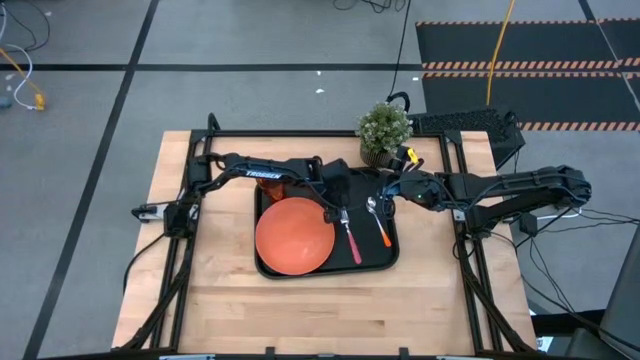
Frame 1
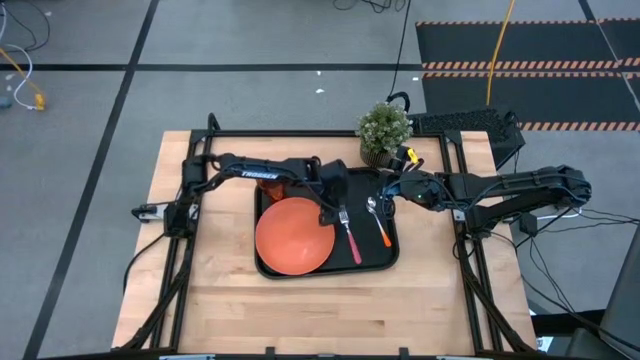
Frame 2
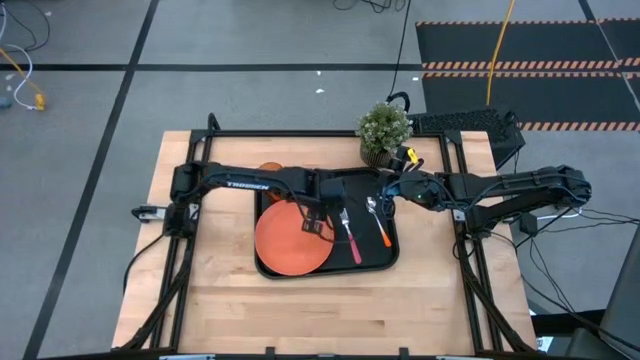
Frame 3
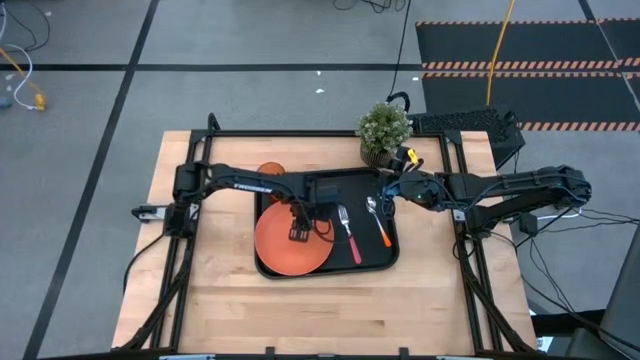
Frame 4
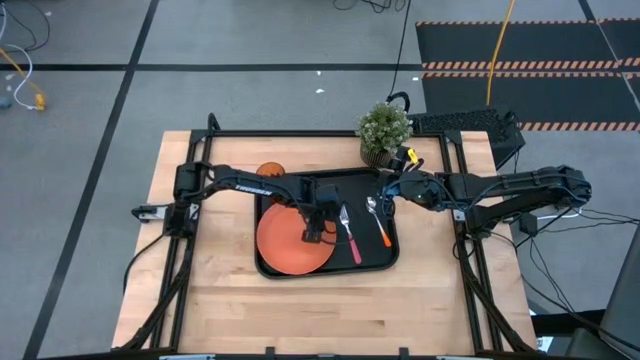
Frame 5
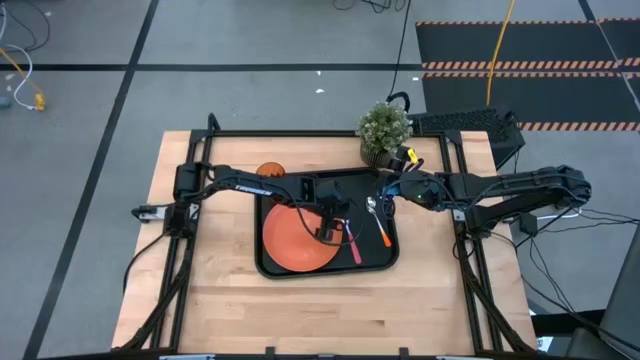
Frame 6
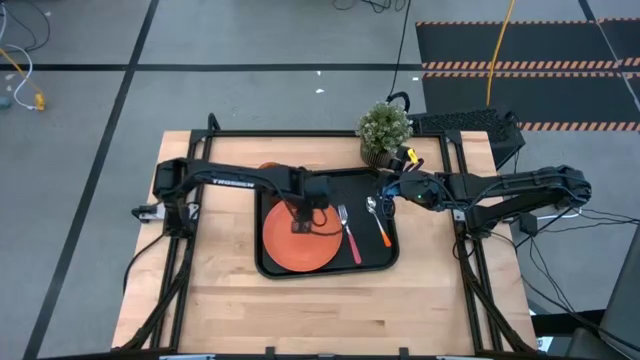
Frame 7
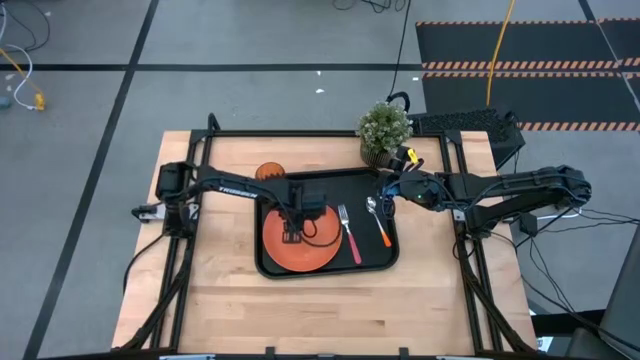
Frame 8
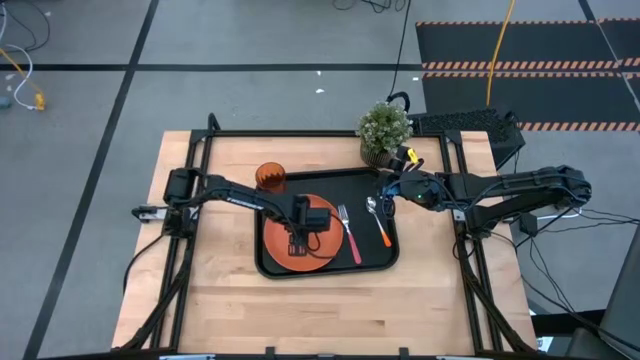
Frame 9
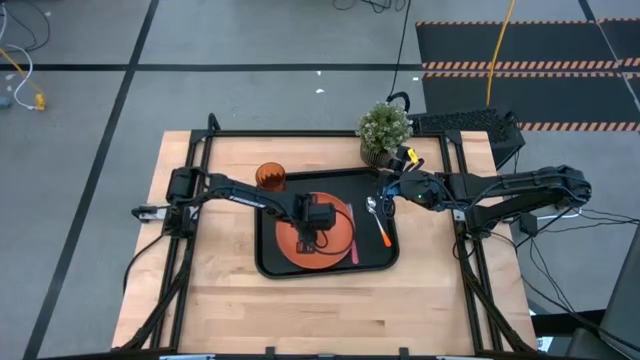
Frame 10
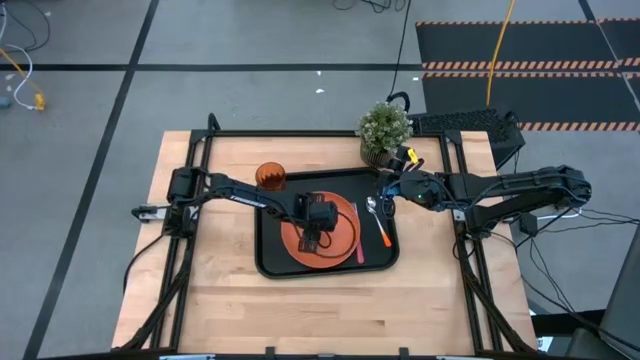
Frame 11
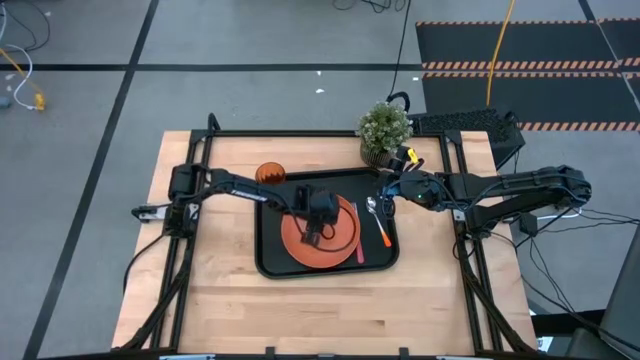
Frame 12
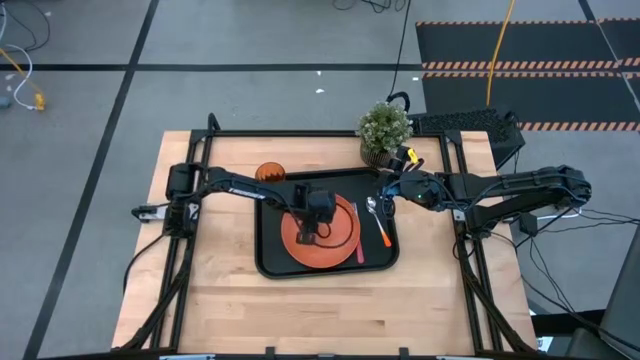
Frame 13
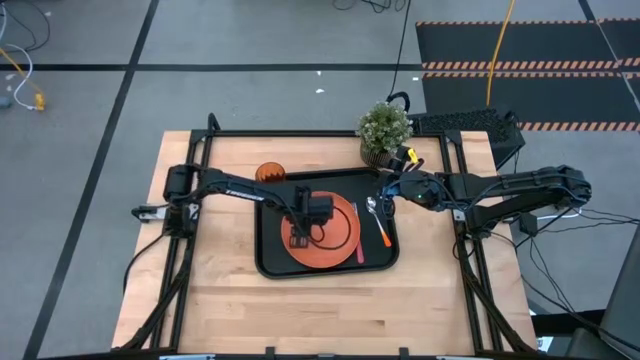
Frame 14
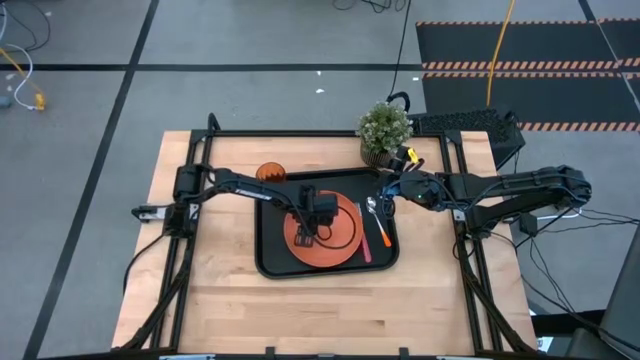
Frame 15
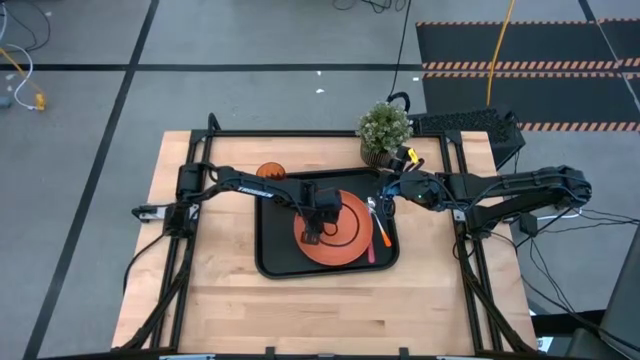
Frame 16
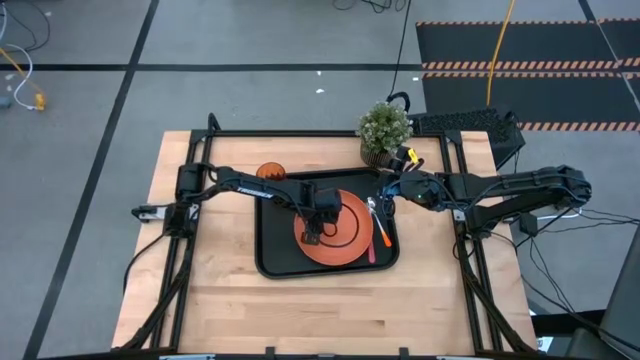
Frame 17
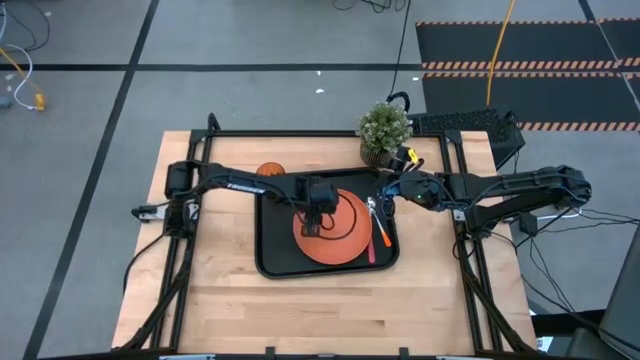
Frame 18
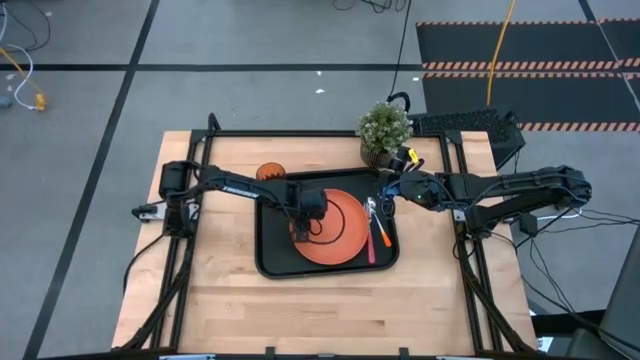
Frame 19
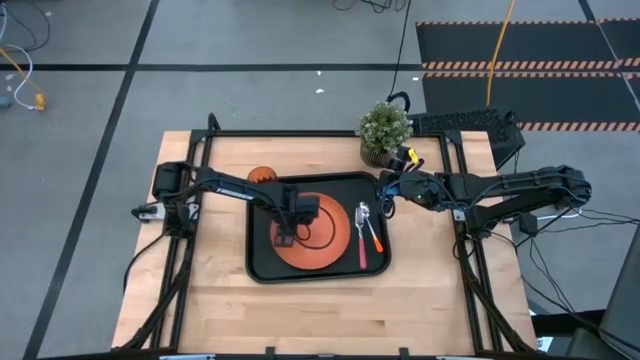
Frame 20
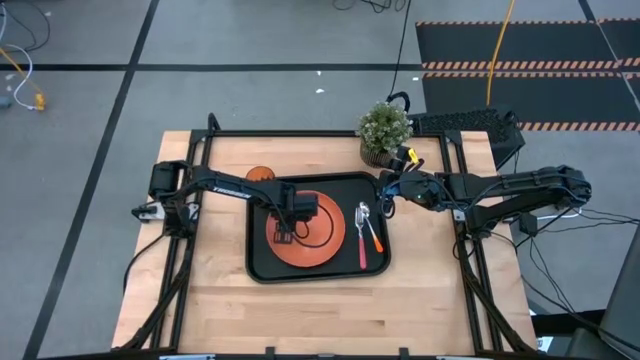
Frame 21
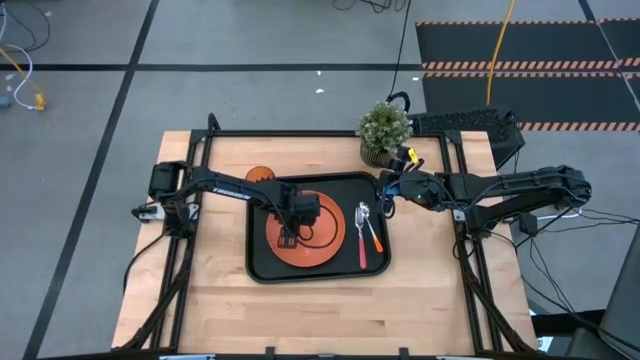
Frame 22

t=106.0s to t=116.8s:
Task: Pick and place plate/cup/fork/spoon on tray
Adjust the orange plate on the black serving tray

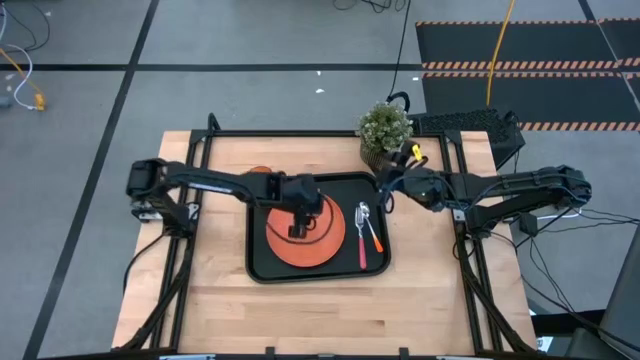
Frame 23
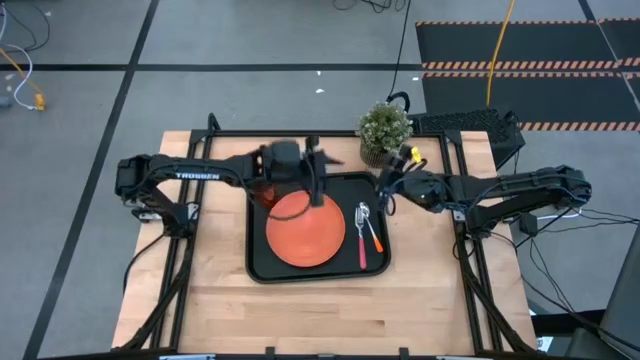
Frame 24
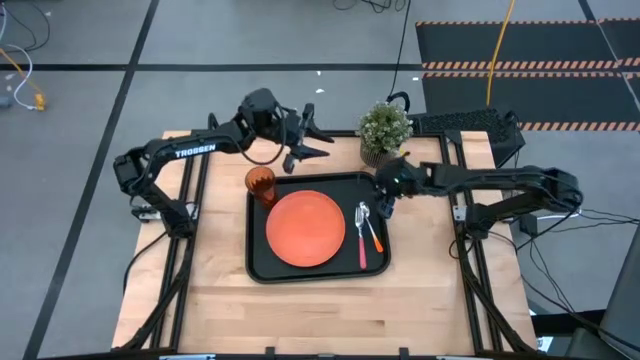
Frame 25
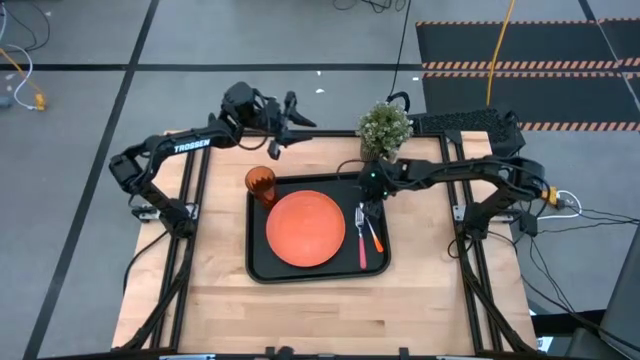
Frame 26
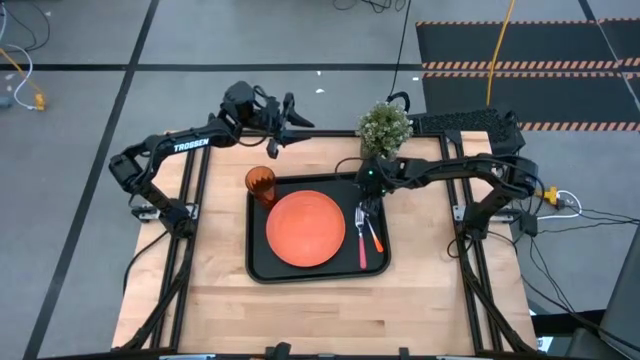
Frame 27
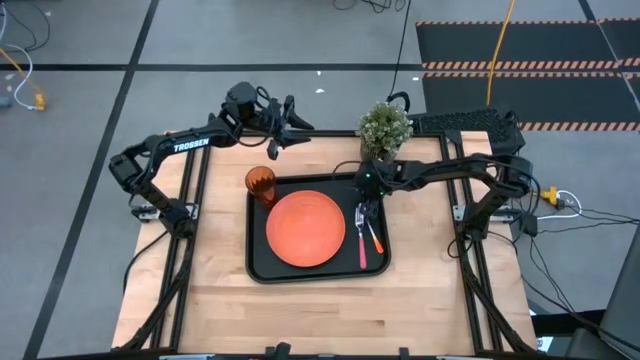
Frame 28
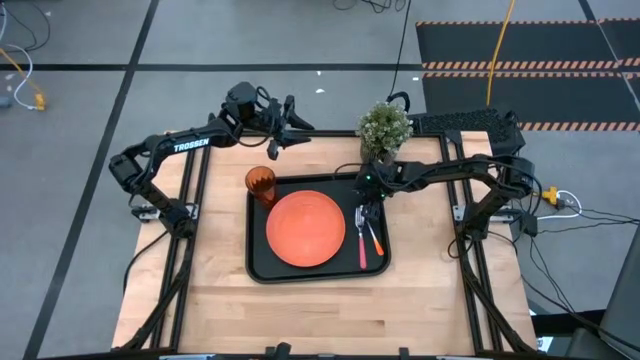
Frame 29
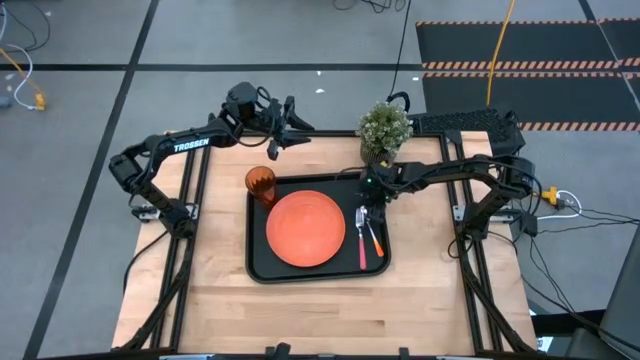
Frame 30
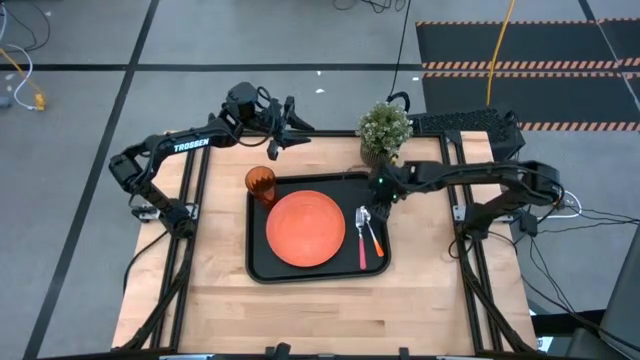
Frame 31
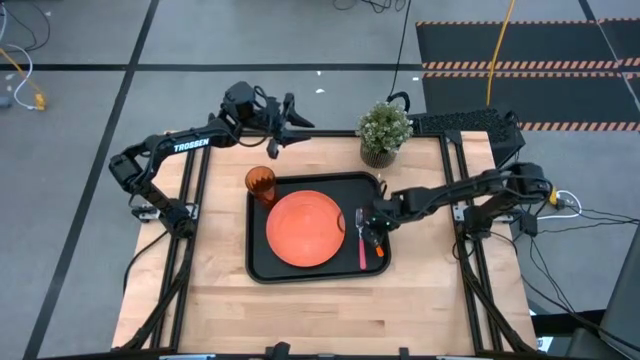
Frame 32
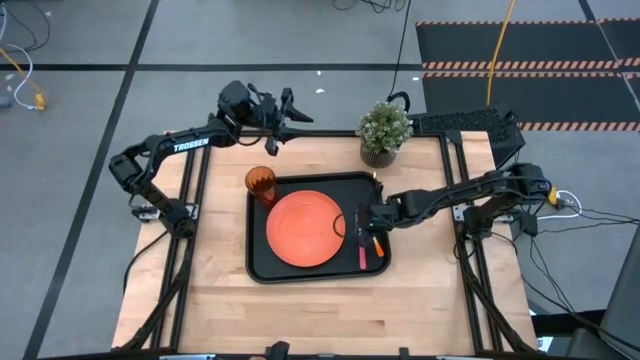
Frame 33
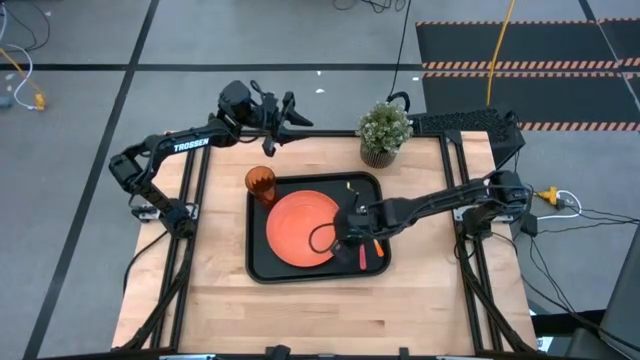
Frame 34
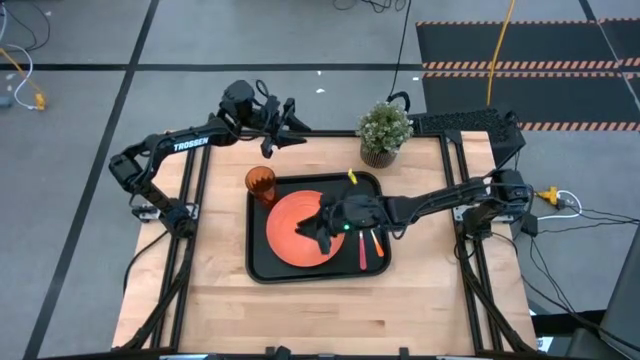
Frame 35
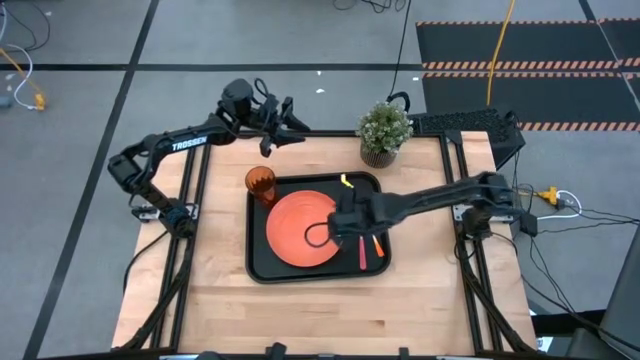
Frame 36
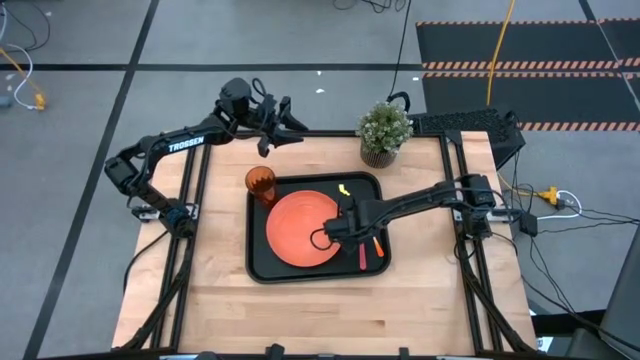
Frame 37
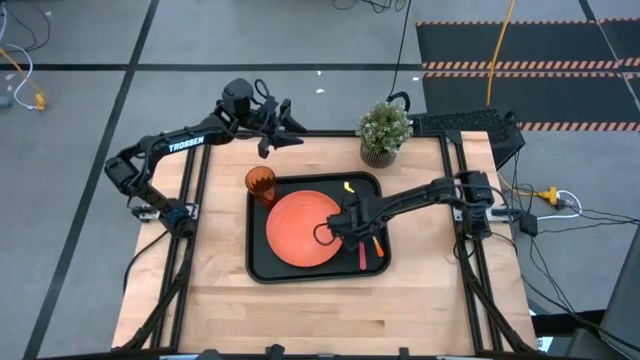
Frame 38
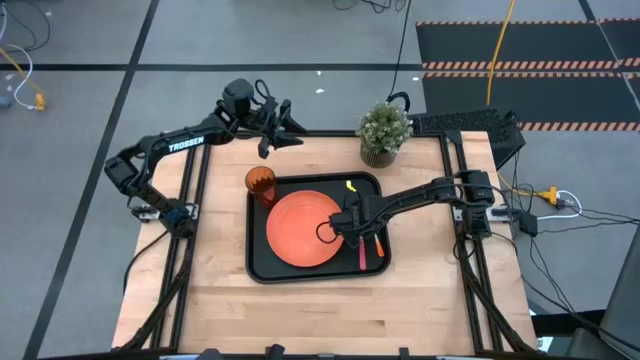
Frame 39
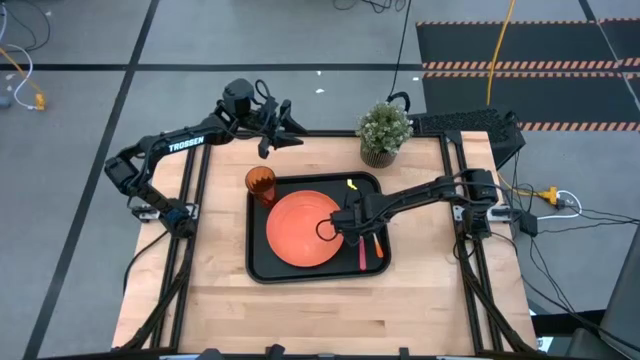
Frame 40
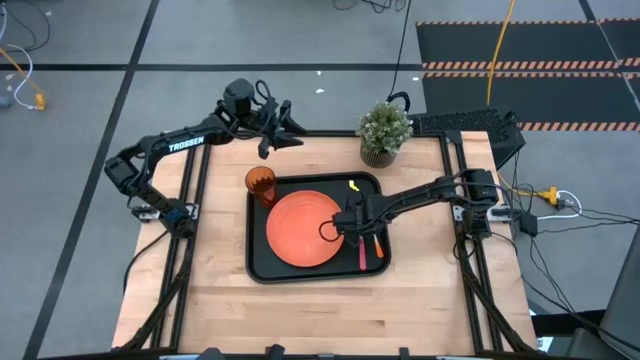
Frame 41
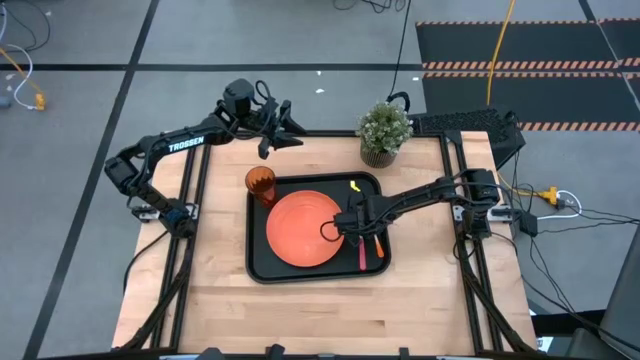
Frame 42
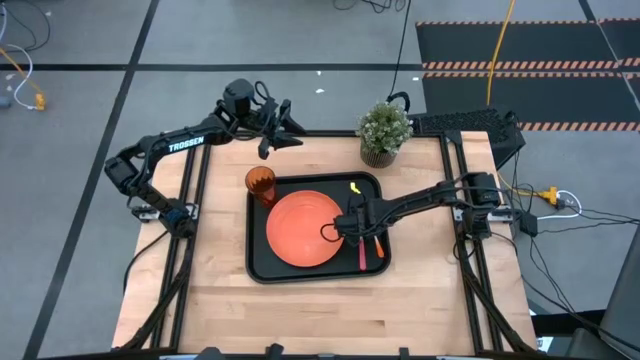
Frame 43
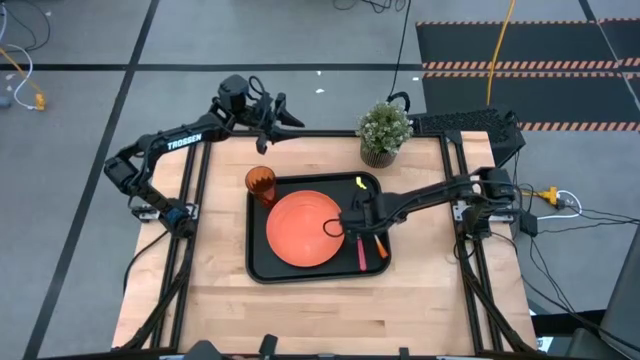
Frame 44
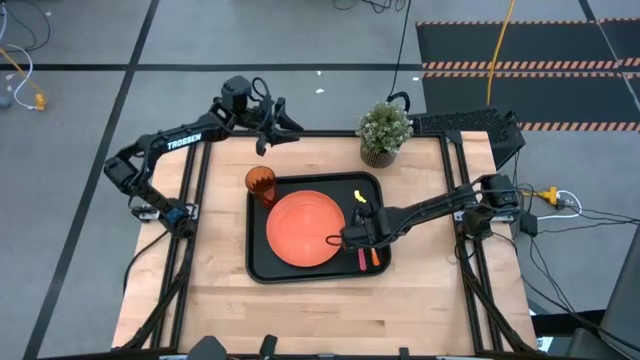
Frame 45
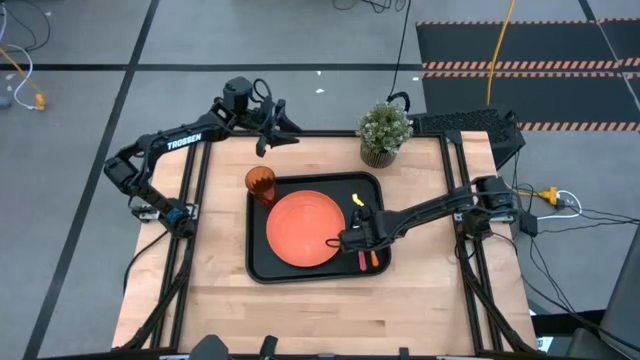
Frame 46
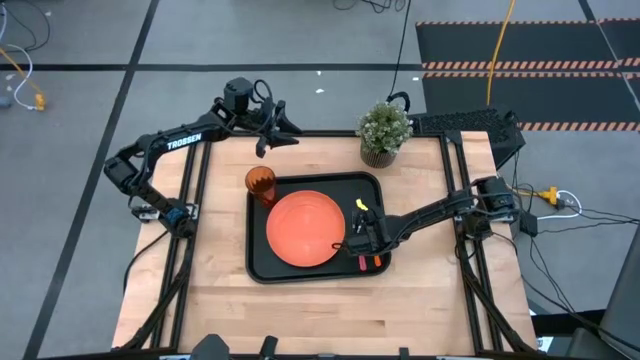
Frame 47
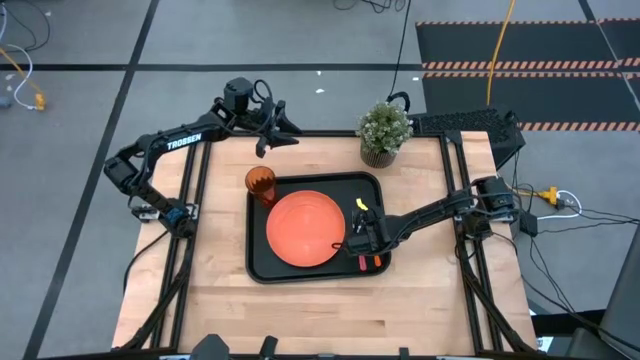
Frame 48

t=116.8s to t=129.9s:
Adjust the orange spoon on the black serving tray
